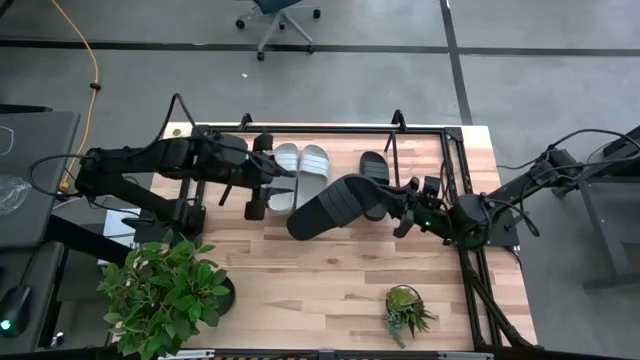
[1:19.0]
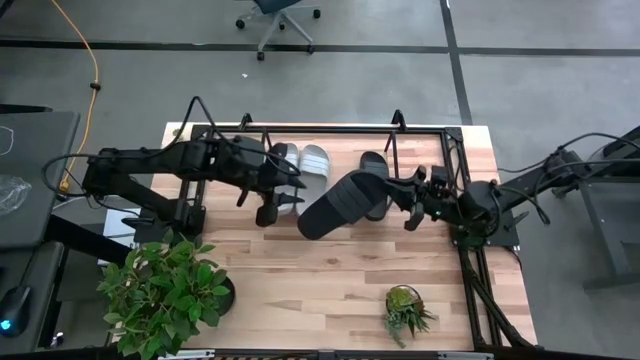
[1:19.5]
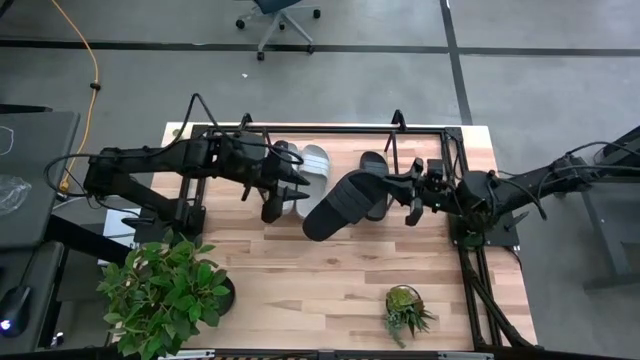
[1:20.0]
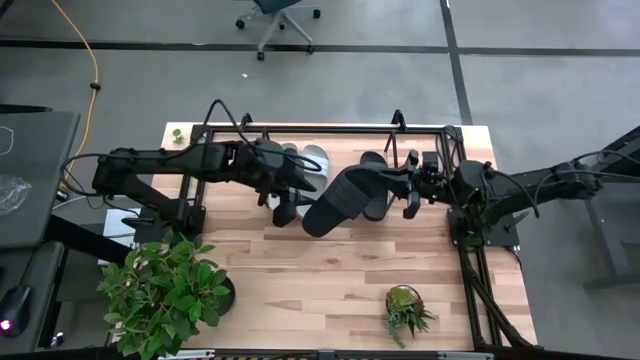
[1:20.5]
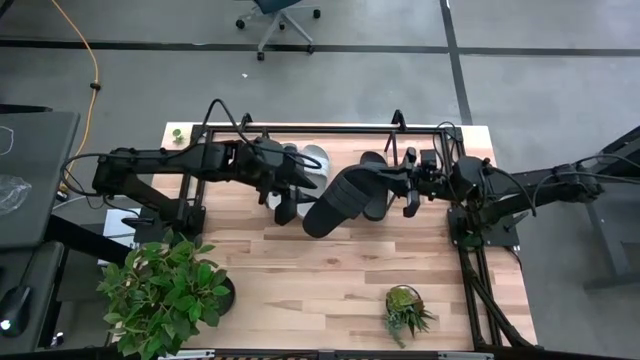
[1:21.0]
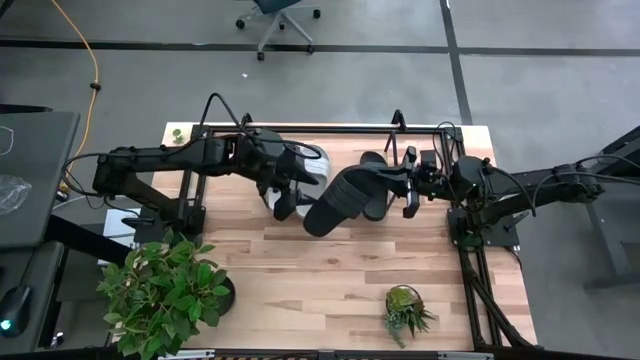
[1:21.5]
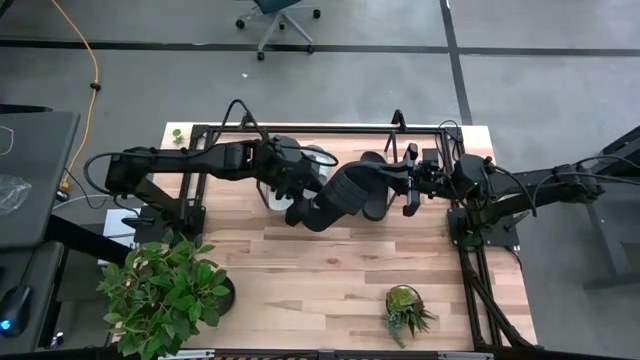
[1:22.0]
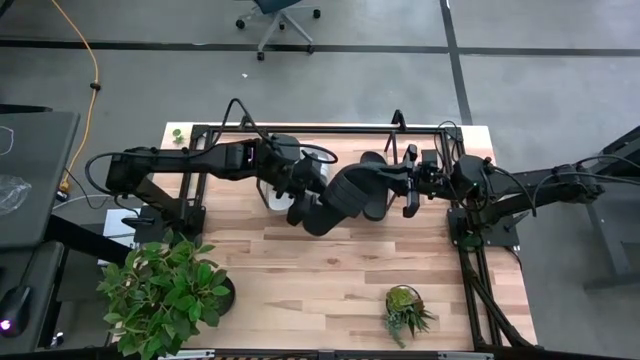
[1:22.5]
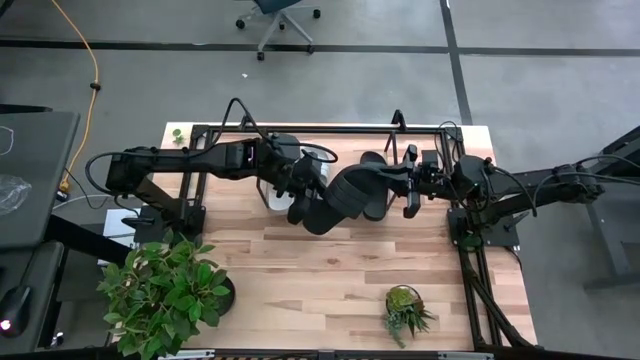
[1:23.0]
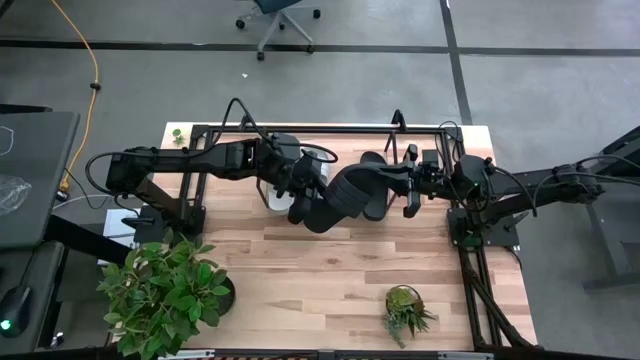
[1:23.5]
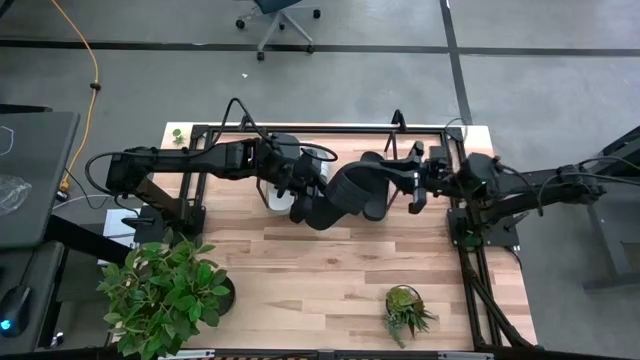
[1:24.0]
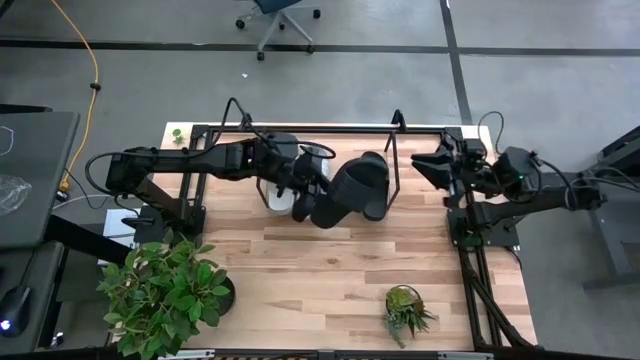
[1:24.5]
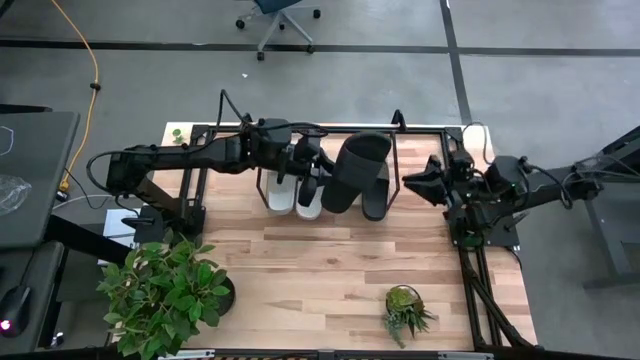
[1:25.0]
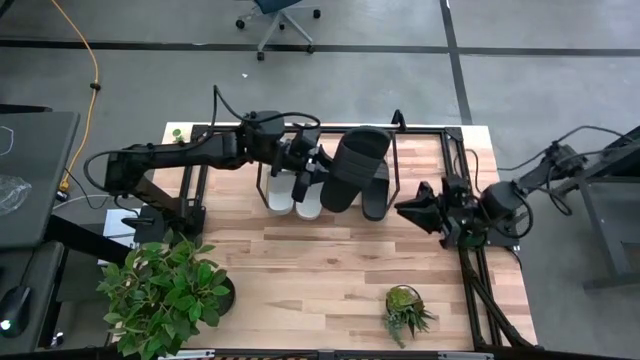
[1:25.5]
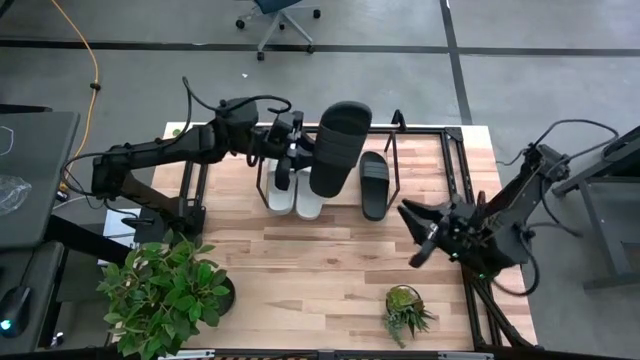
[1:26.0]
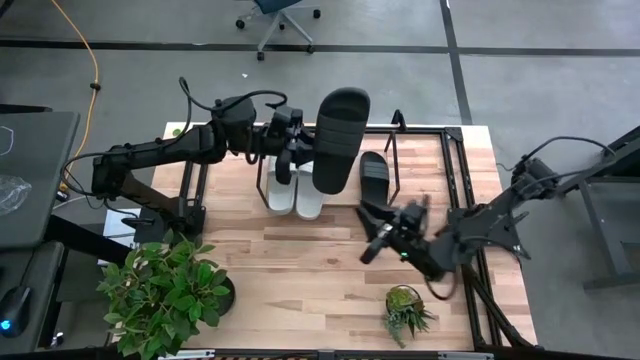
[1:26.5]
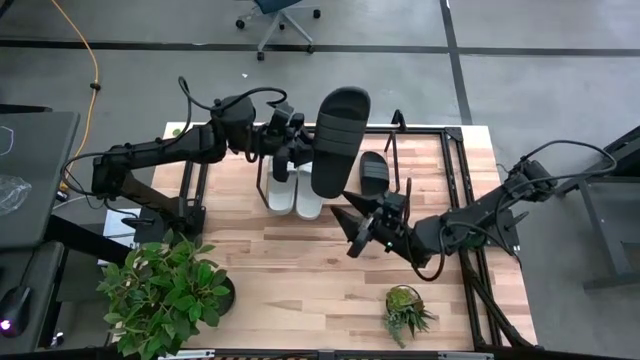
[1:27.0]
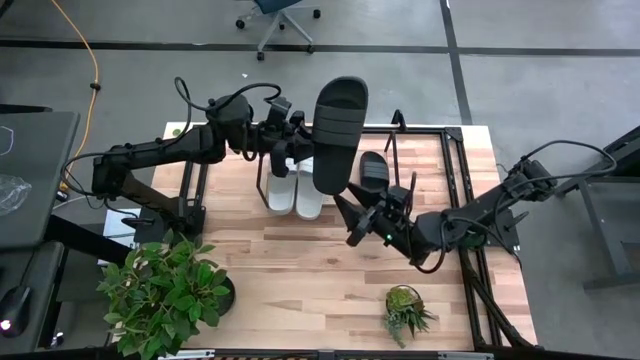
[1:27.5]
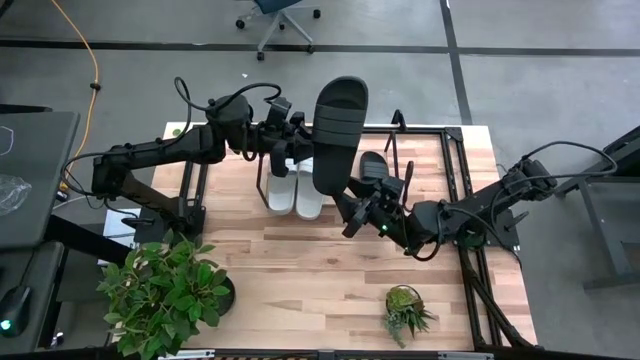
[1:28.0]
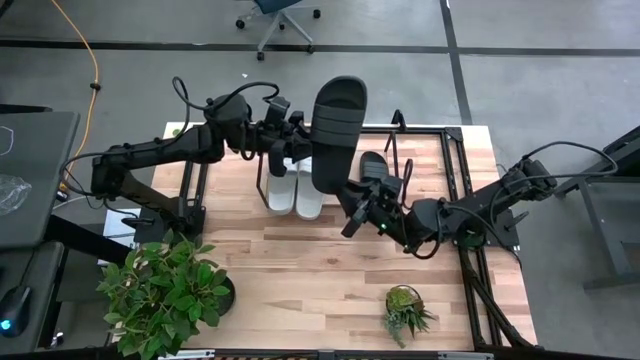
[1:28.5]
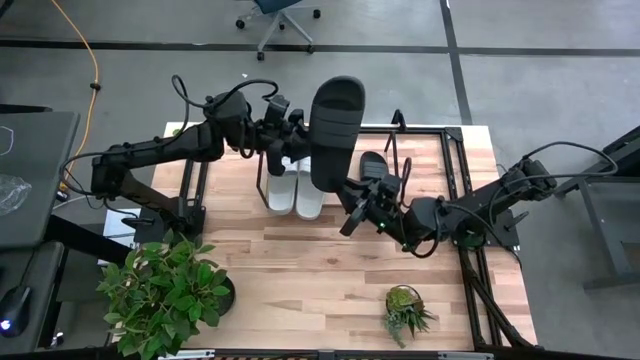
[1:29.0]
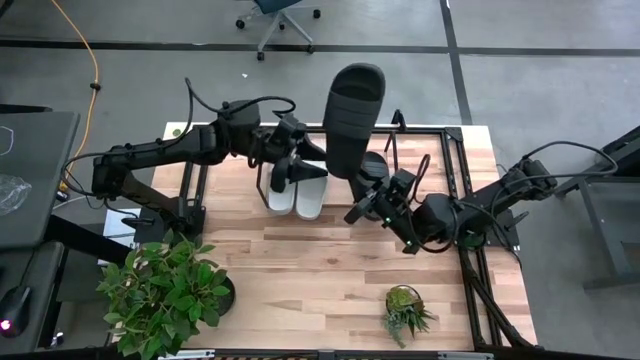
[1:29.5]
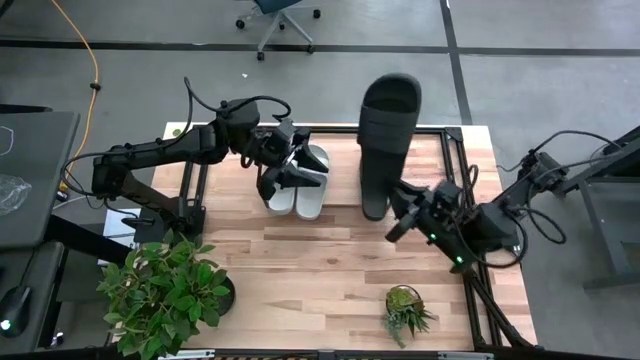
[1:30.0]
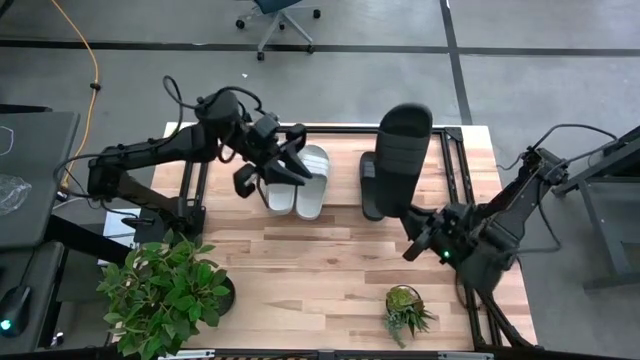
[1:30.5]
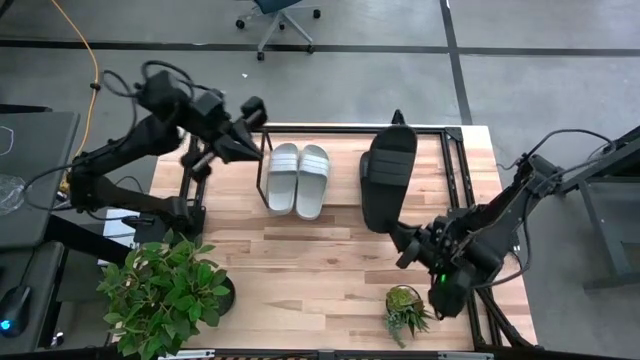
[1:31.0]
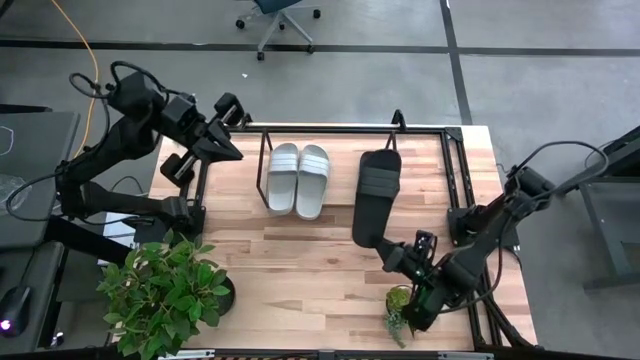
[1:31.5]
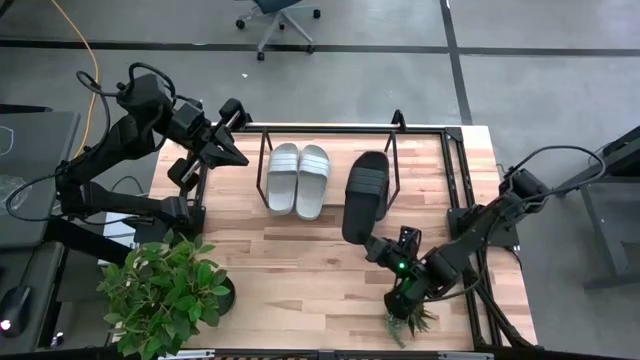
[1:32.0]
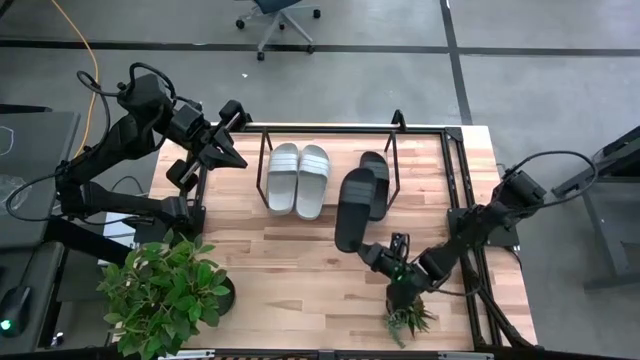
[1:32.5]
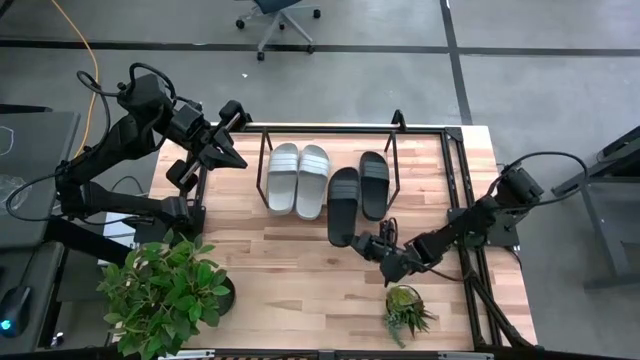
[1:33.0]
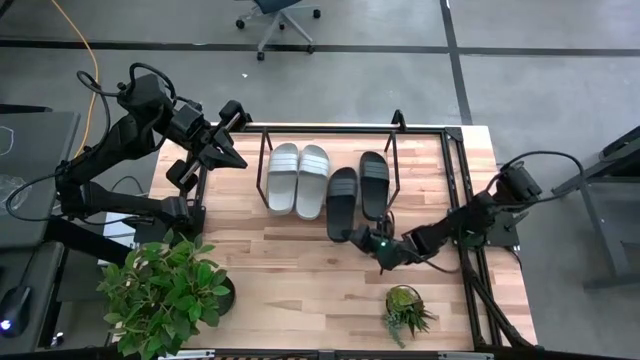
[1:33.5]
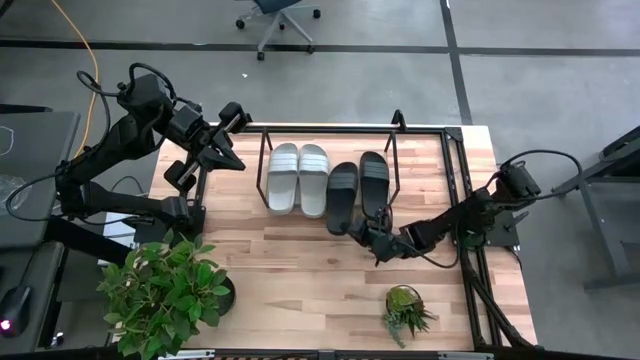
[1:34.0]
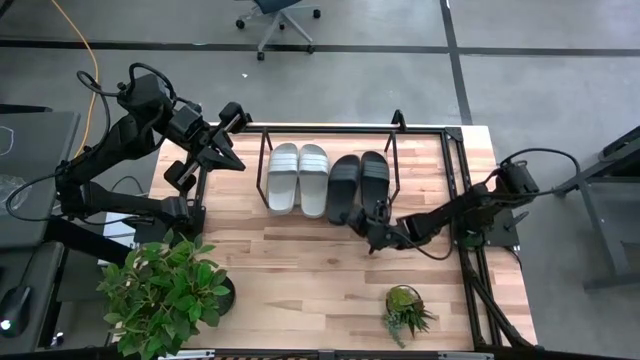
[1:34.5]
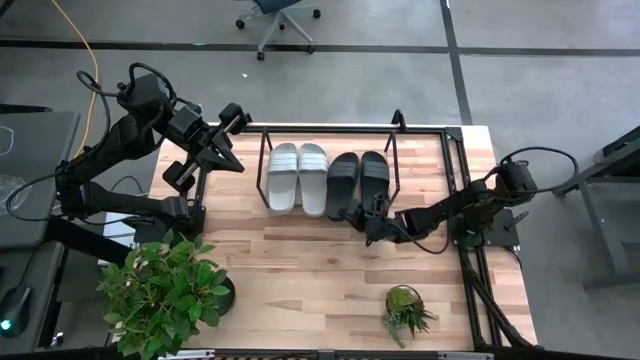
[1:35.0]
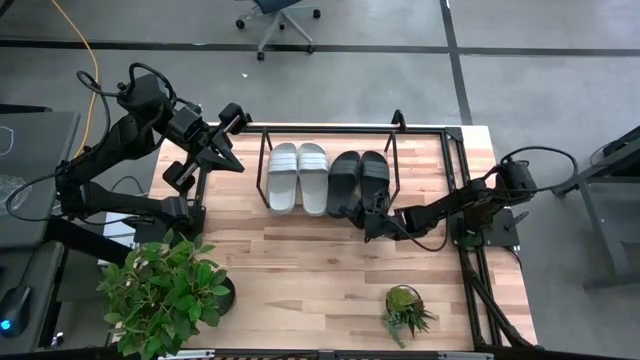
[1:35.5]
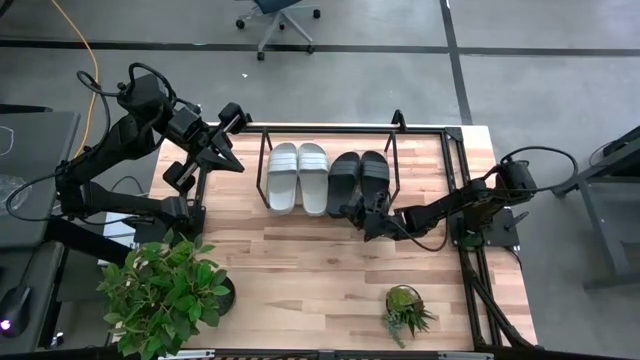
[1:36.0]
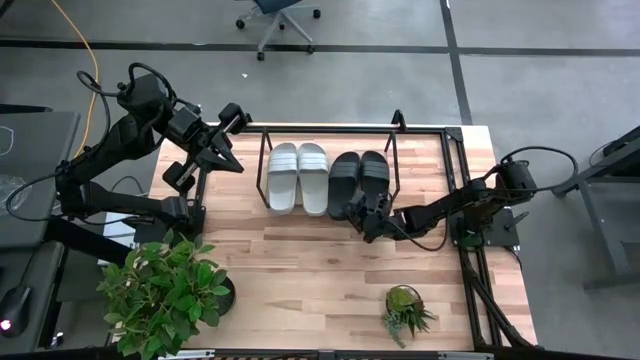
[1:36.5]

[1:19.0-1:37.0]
Task: Pick and place slides into the shelf
Put the black slide on the shelf

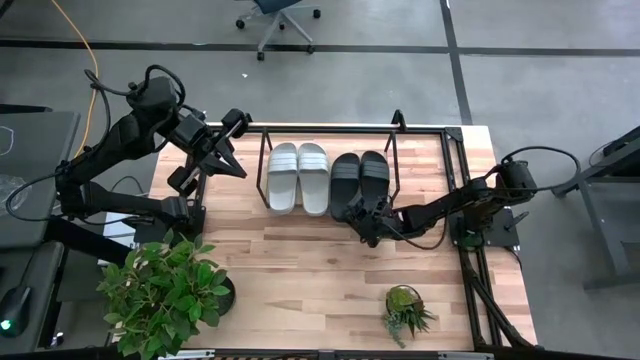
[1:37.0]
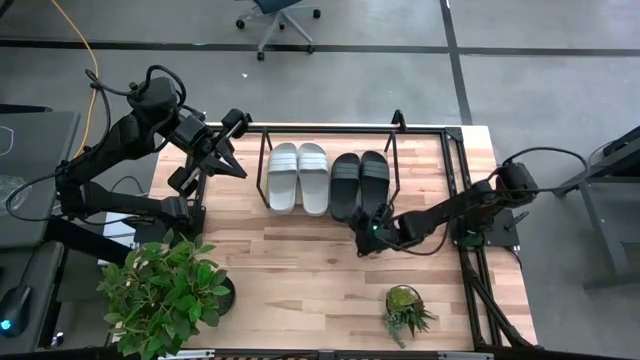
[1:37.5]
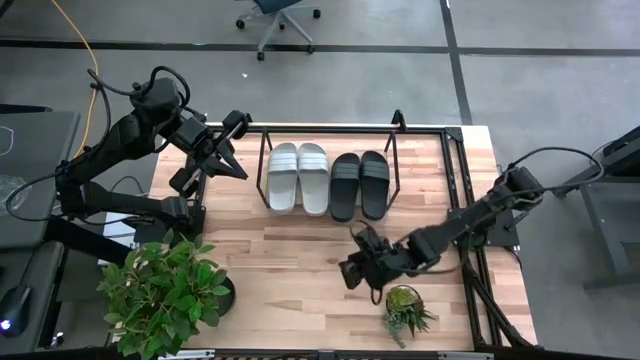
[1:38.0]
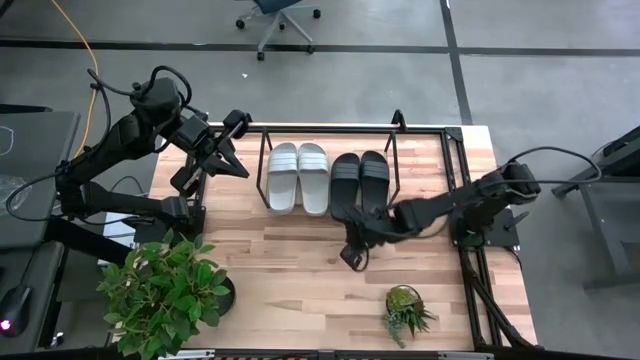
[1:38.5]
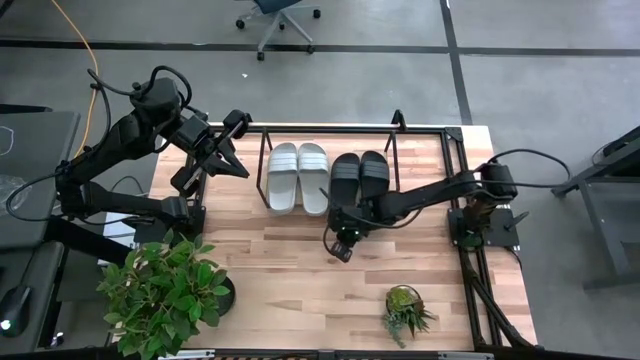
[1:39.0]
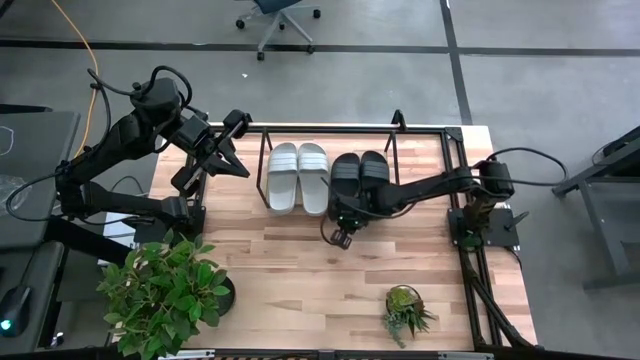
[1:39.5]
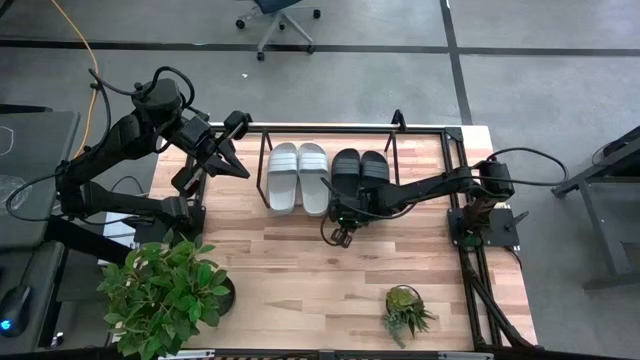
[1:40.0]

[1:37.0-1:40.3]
Adjust the left black slide on the shelf

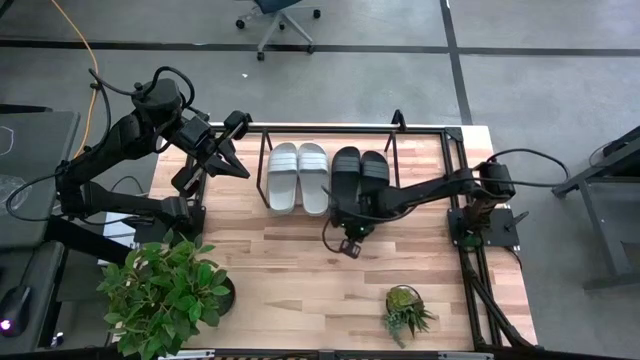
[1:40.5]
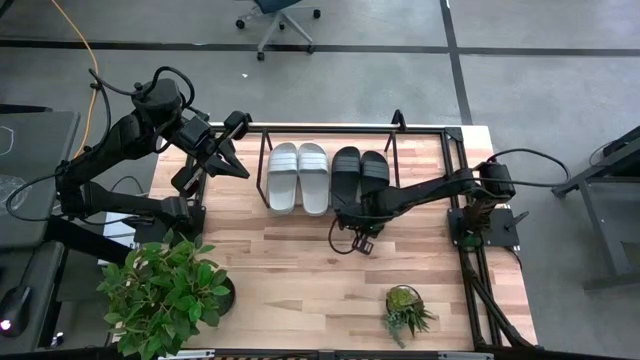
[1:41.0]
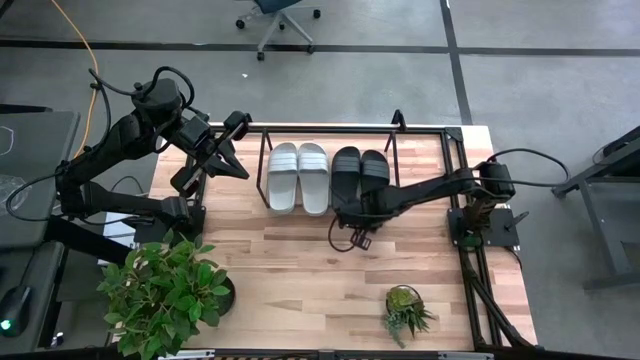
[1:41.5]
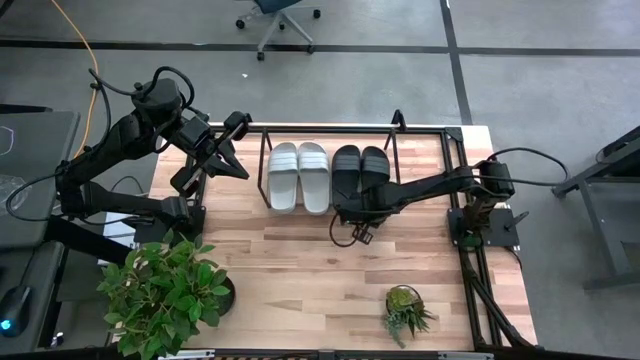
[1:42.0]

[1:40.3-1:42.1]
Adjust the right black slide on the shelf
